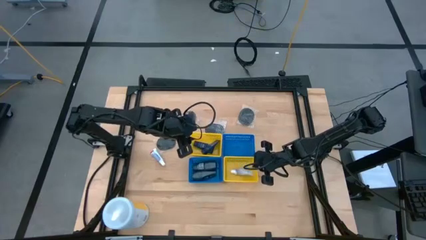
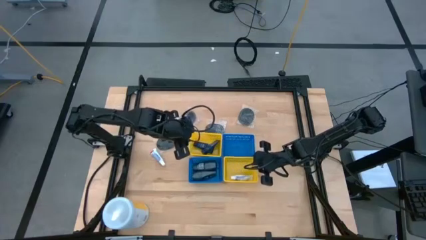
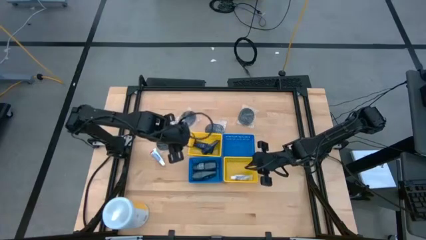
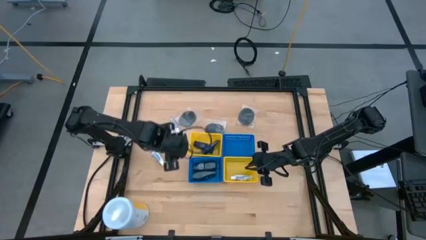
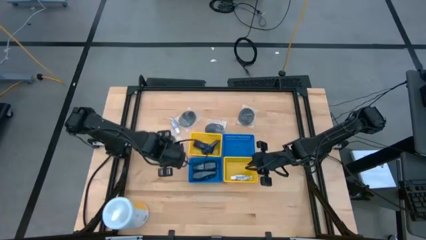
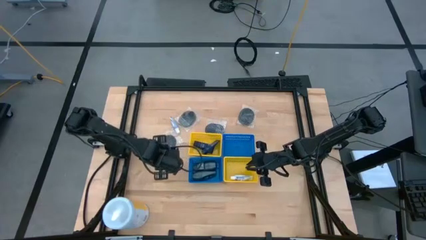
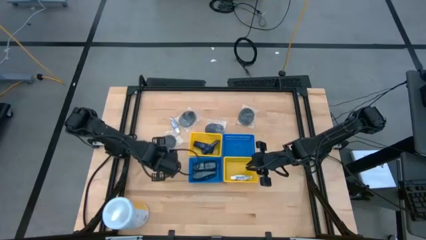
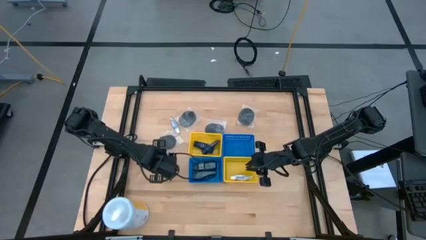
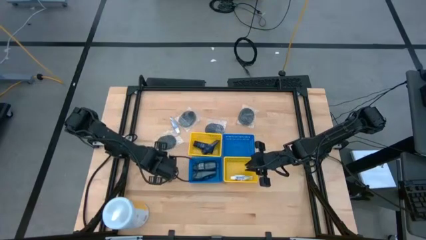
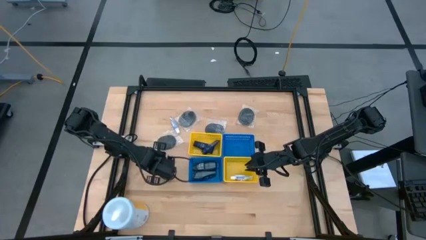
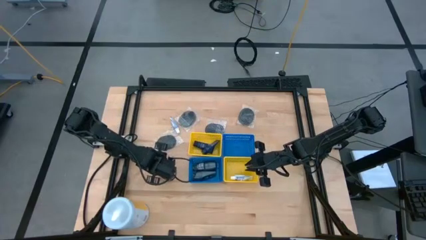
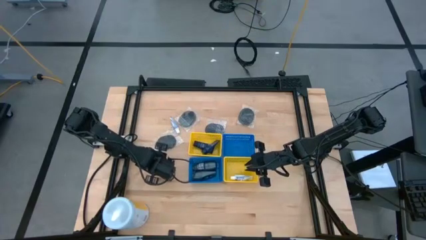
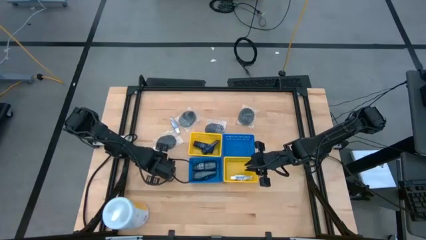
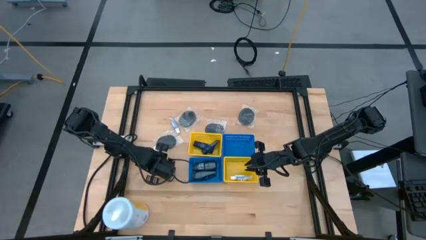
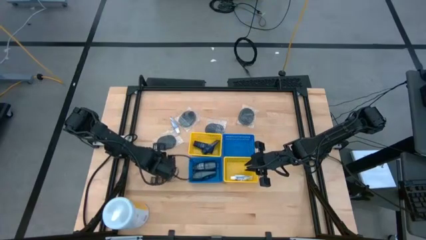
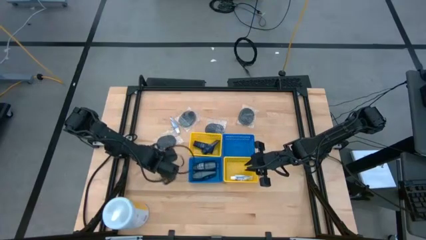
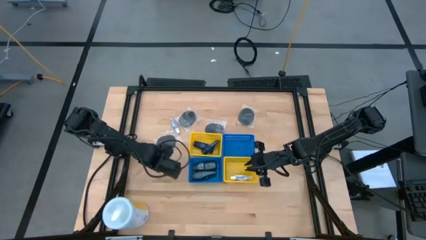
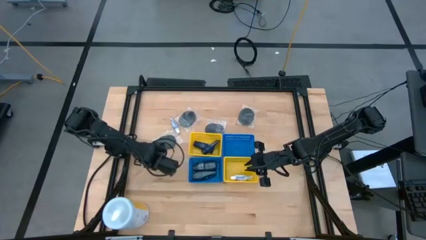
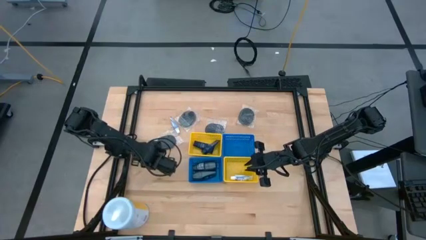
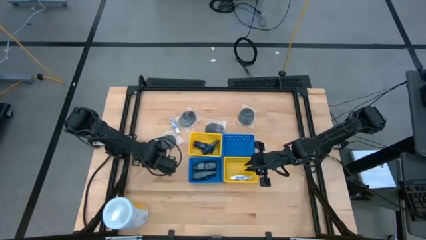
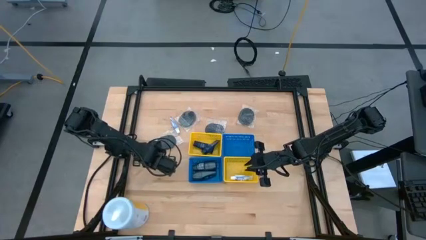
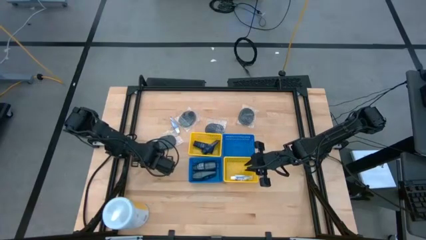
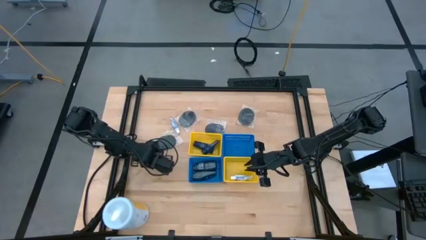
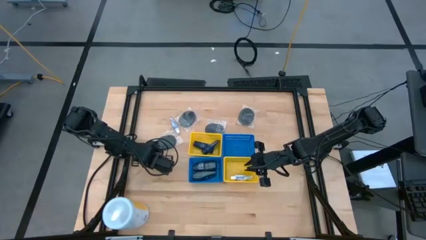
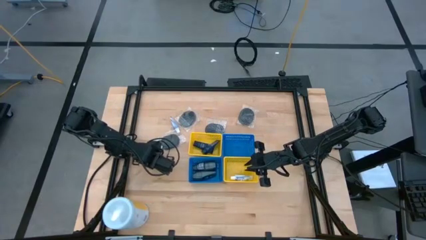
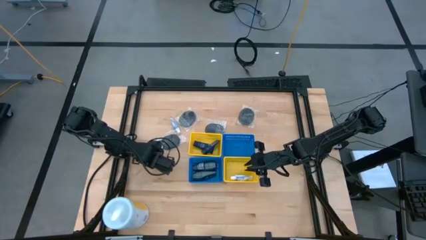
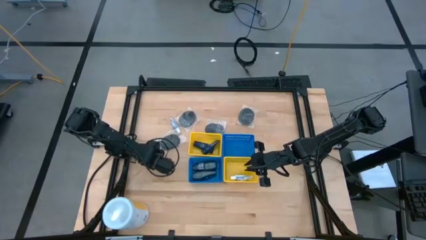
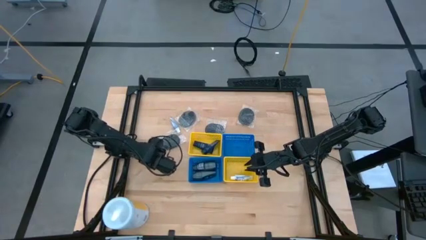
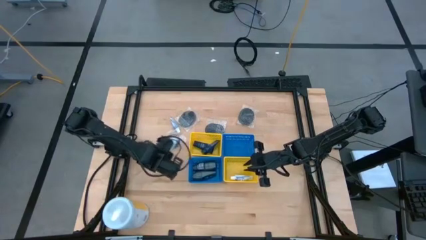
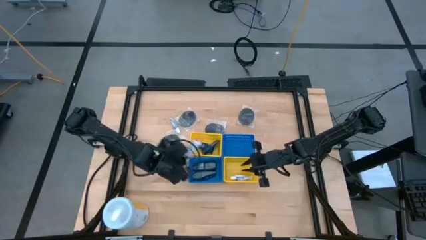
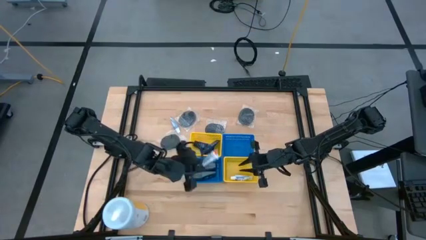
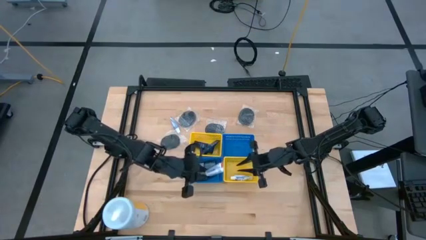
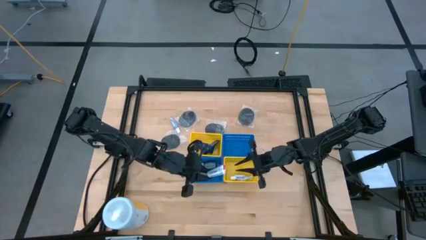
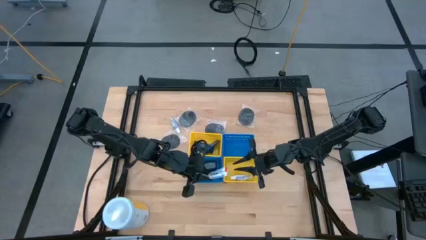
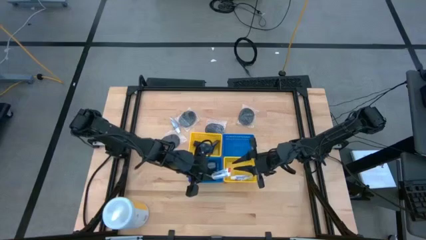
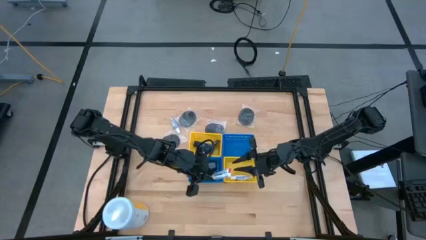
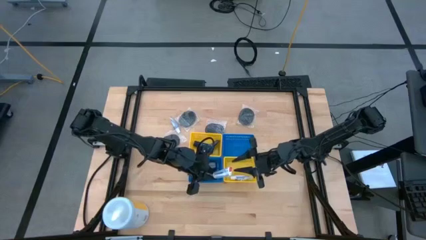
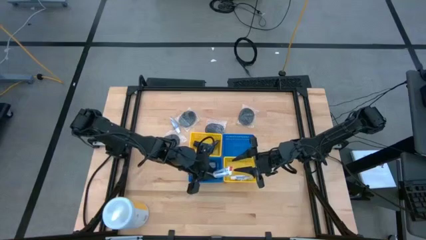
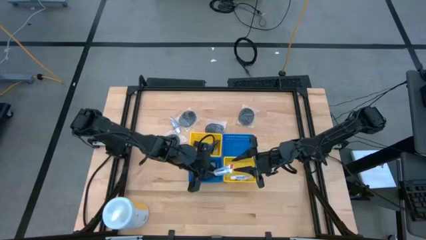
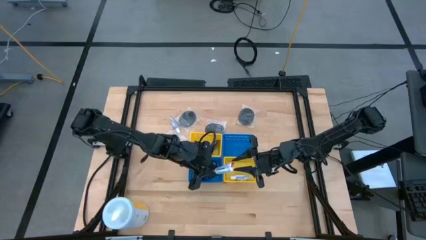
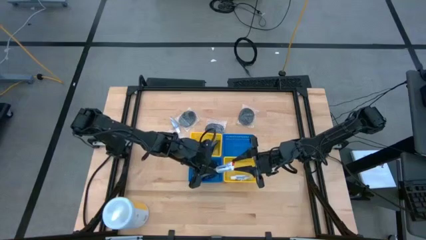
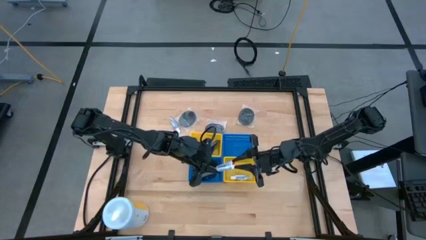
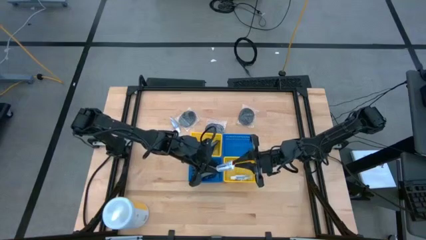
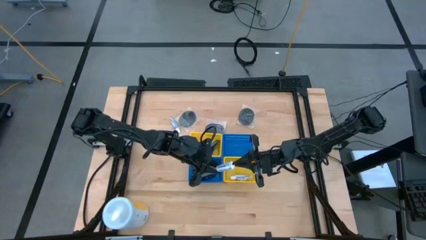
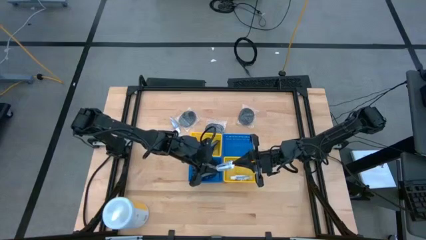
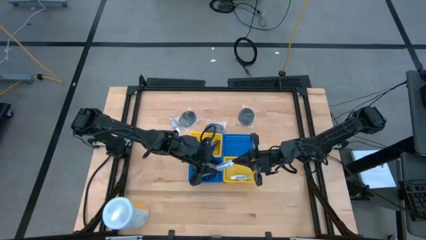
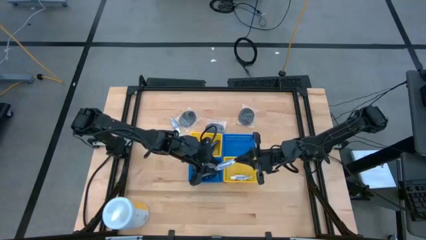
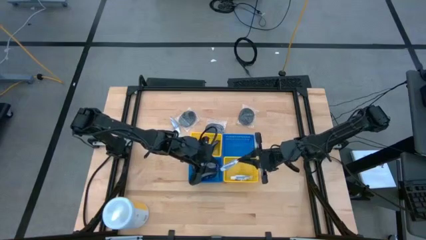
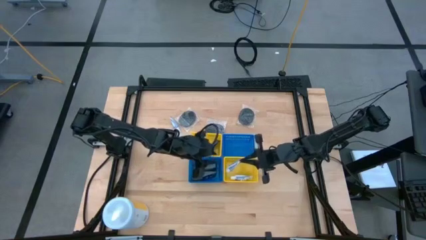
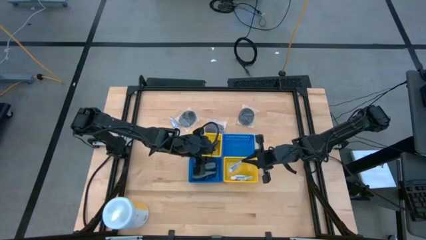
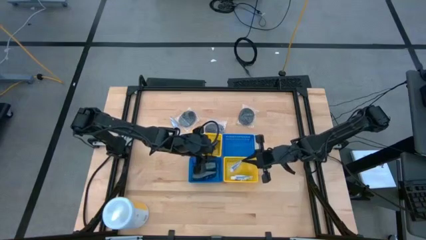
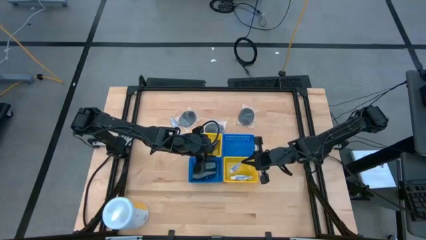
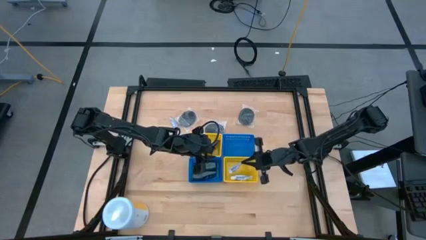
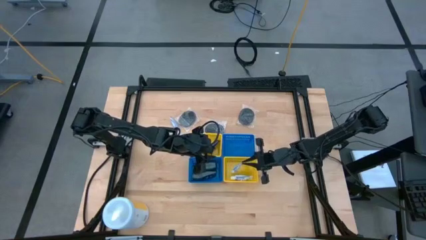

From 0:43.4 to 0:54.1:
Task: Pick & Place Travel size toiletries
Put the white toothpaste into the right yellow bin

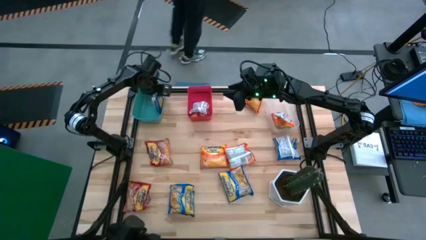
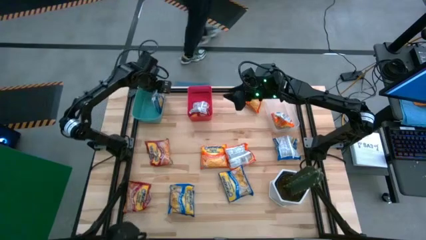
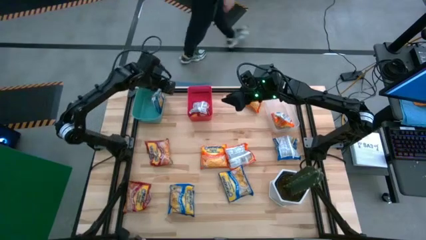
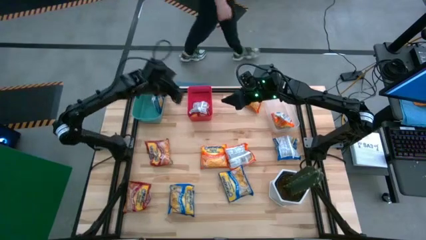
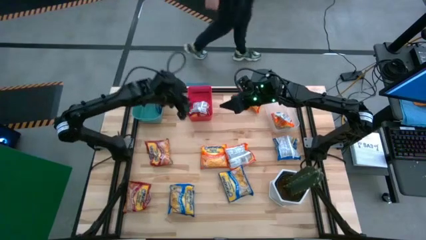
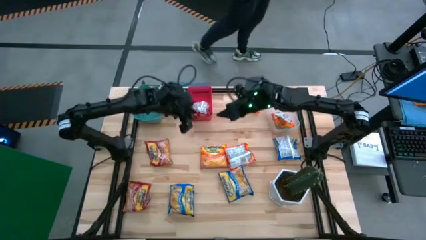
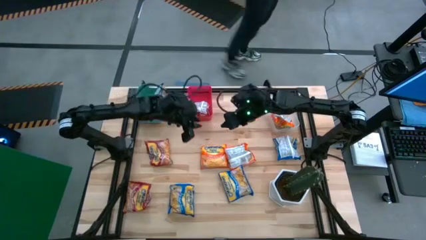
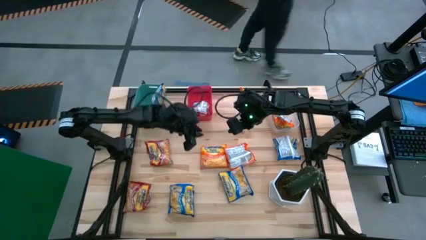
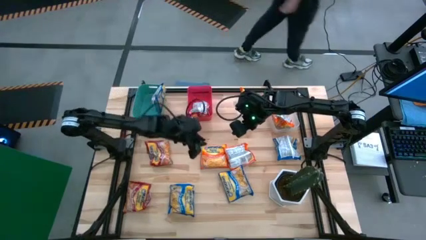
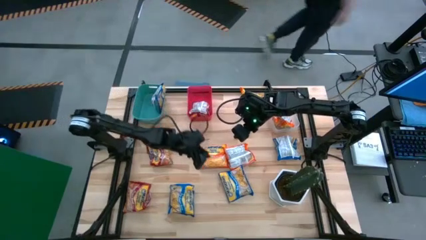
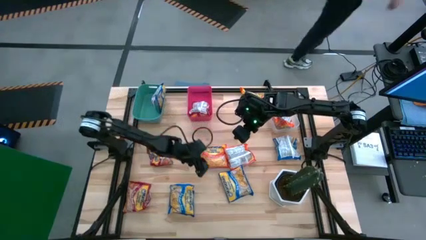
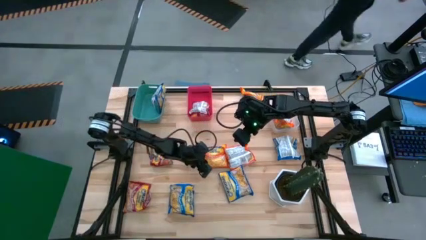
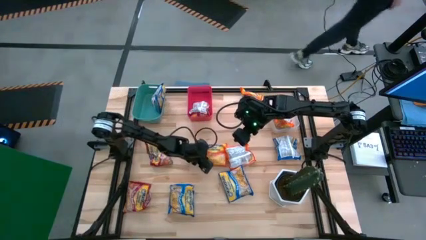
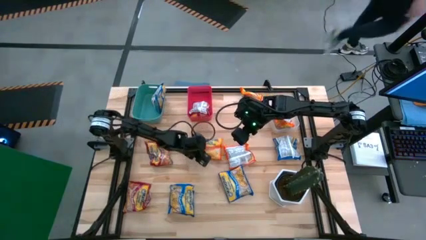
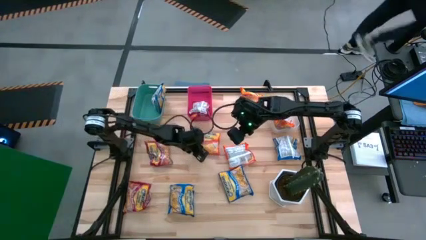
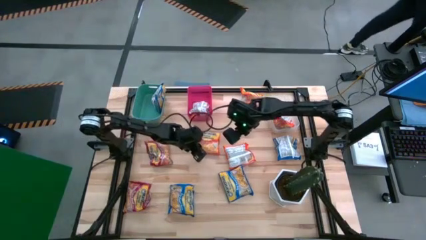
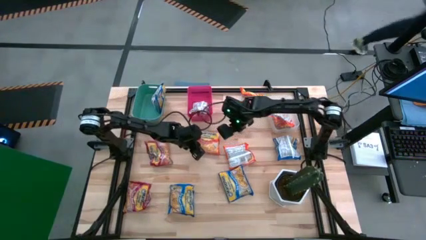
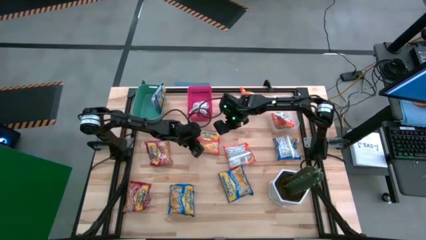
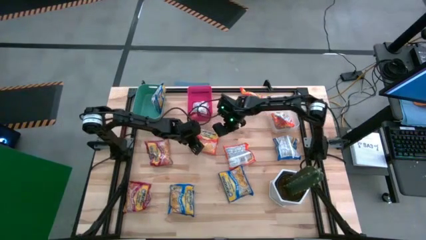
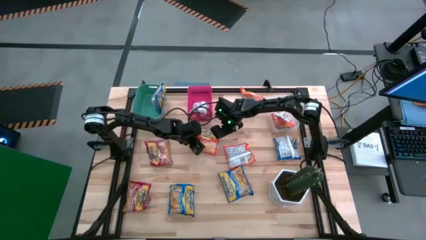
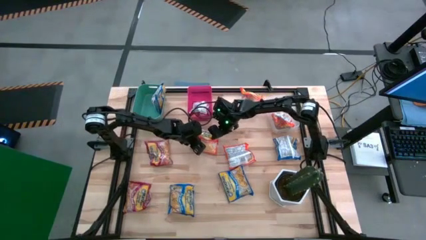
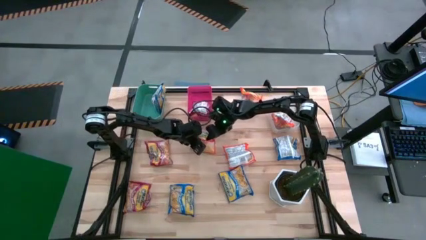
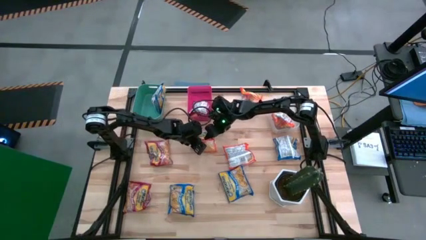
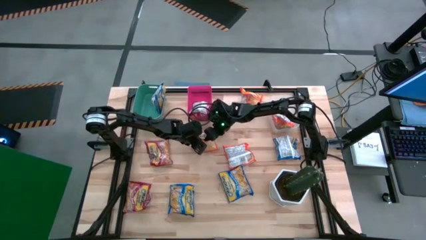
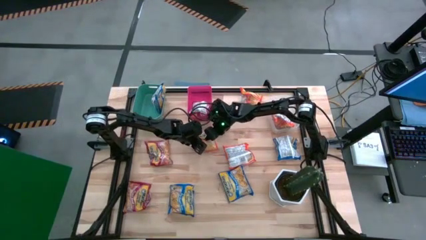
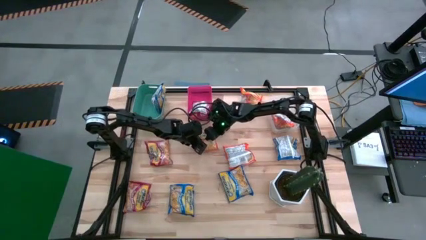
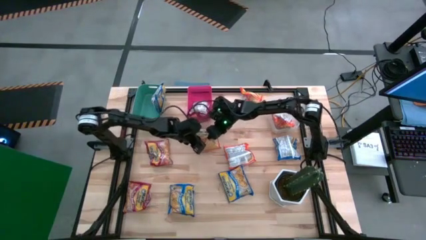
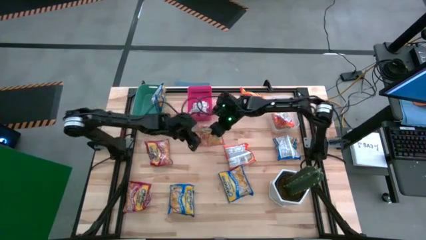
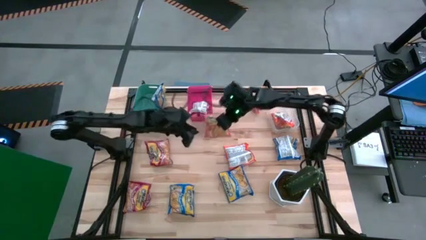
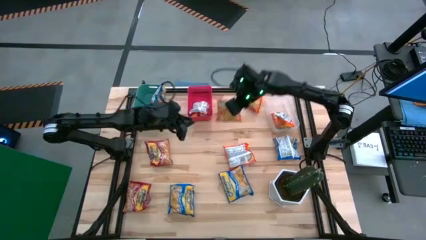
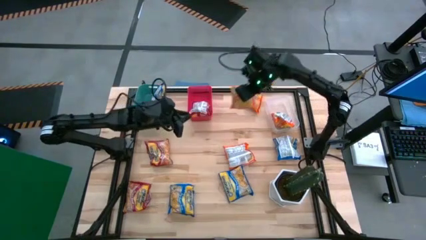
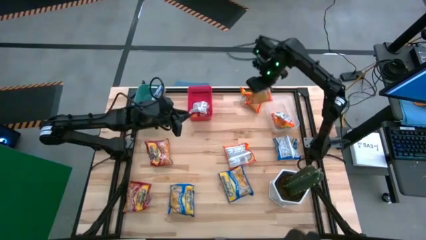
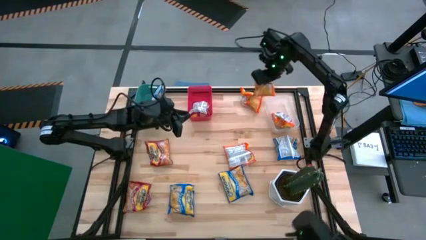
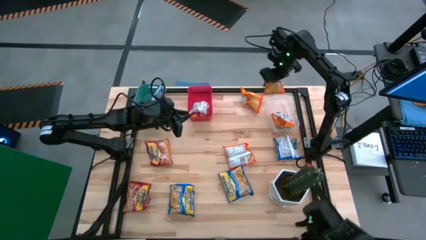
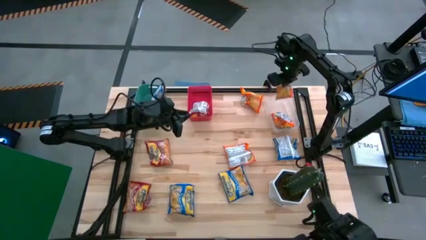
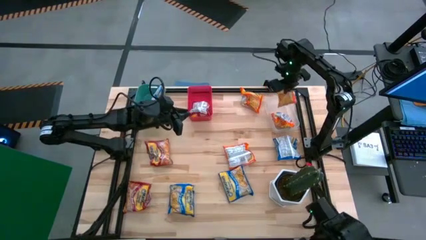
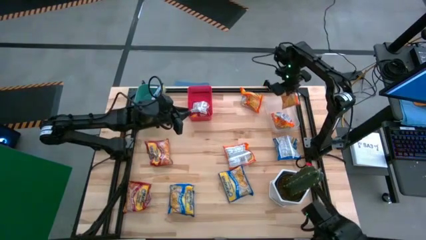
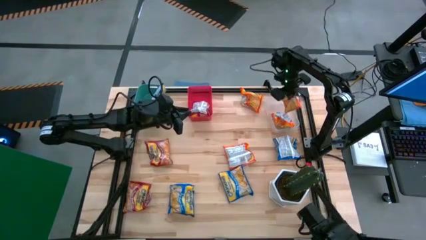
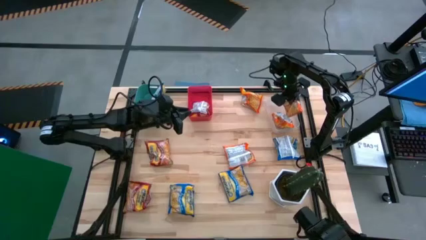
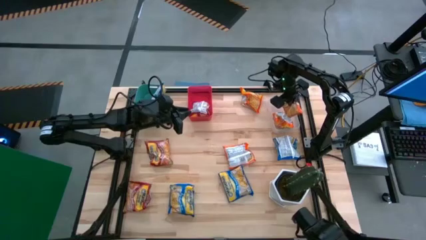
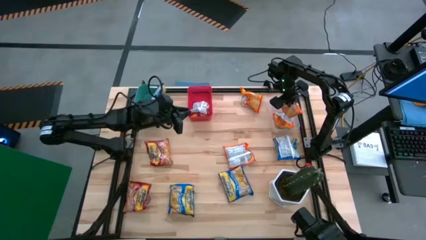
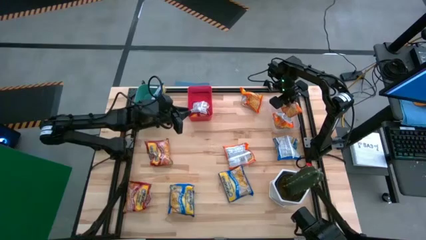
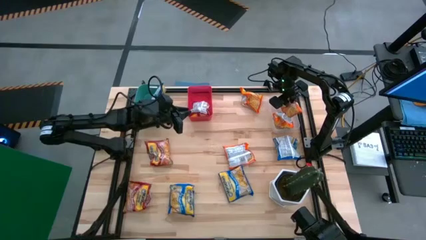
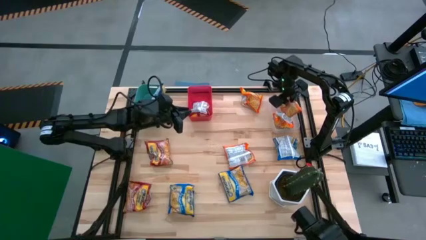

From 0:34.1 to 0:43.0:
Task: Sort Maruchan noodles
Put the orange noodle pack into the transparent bin
